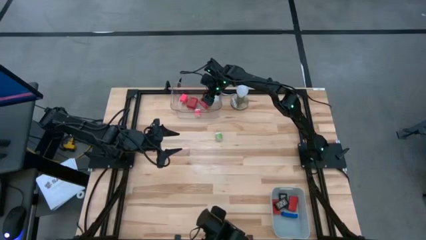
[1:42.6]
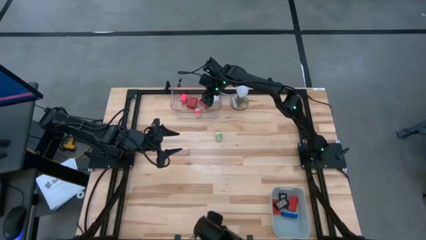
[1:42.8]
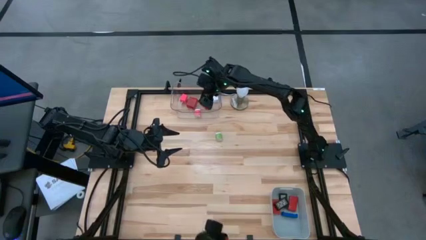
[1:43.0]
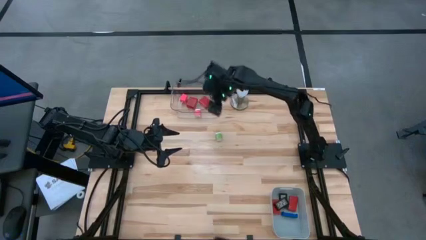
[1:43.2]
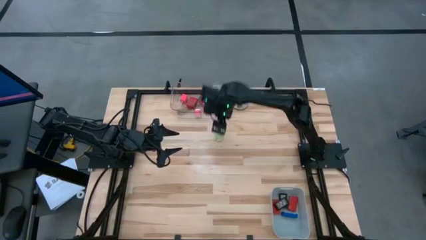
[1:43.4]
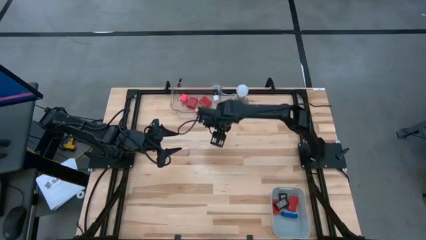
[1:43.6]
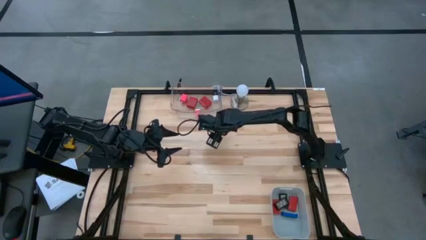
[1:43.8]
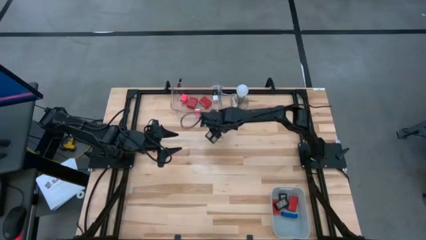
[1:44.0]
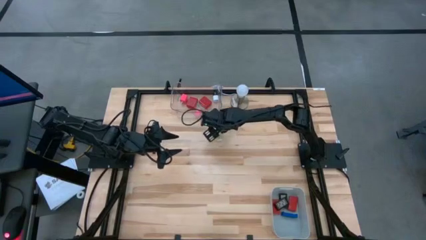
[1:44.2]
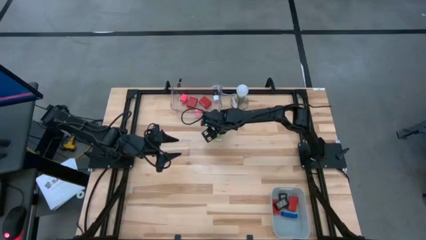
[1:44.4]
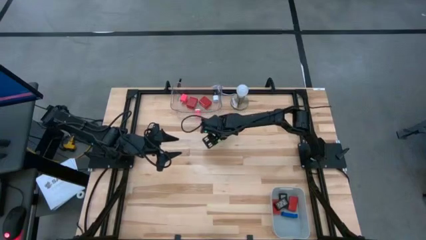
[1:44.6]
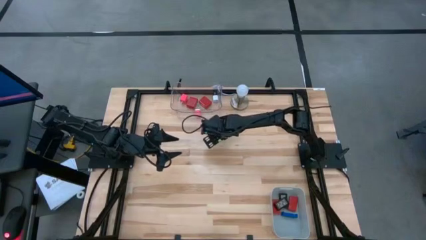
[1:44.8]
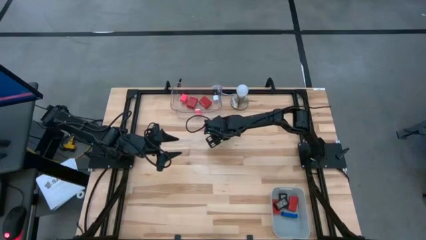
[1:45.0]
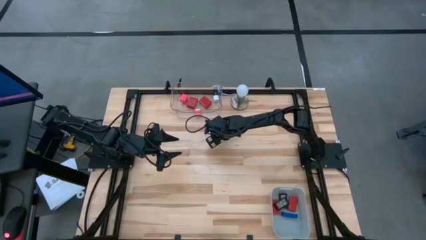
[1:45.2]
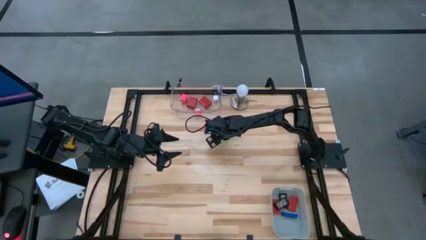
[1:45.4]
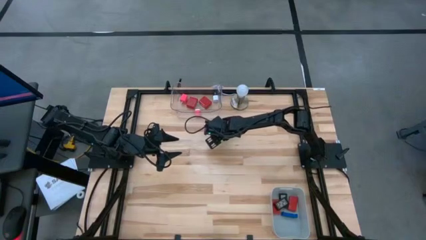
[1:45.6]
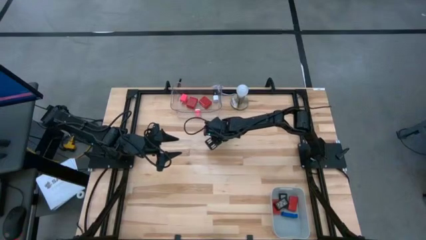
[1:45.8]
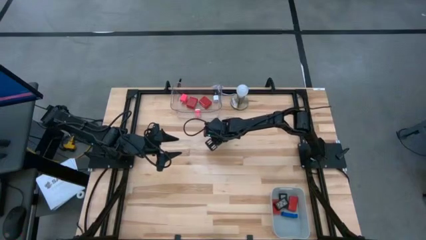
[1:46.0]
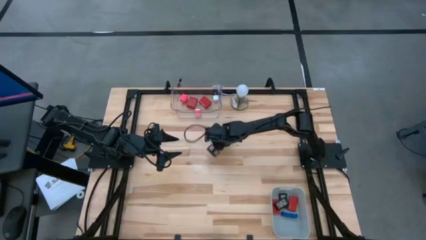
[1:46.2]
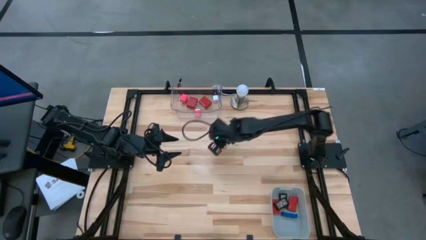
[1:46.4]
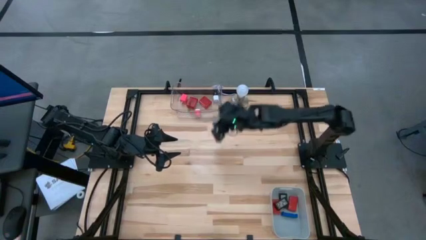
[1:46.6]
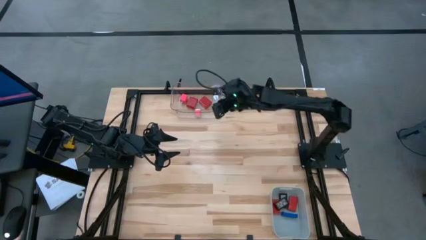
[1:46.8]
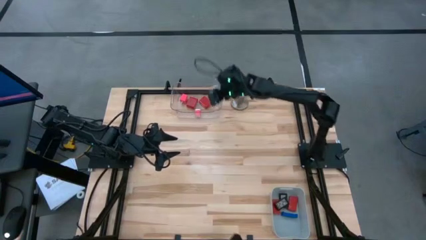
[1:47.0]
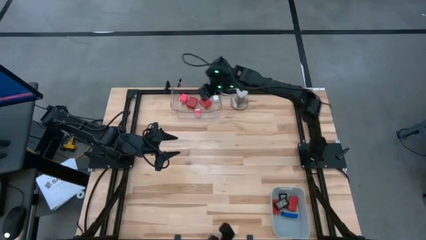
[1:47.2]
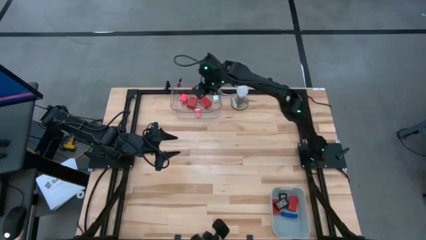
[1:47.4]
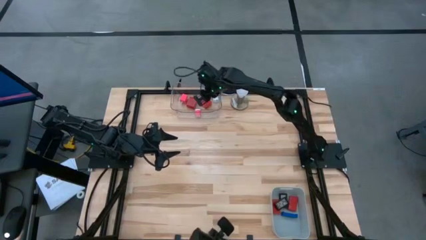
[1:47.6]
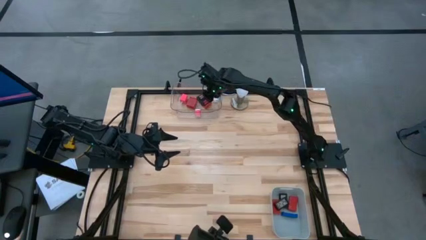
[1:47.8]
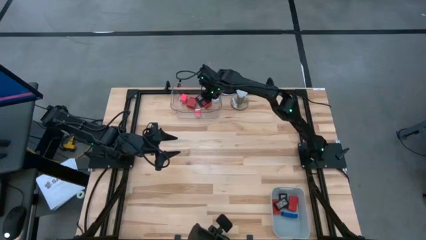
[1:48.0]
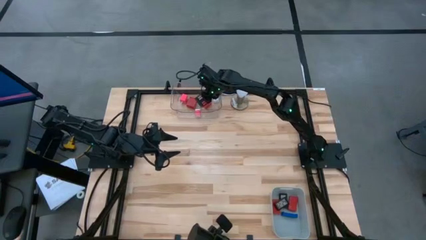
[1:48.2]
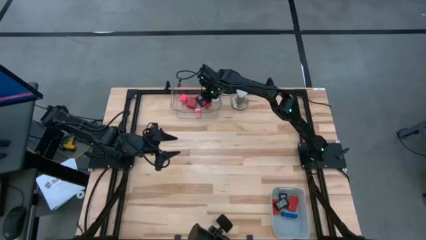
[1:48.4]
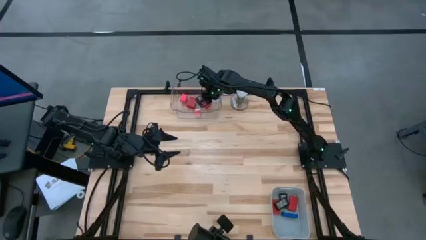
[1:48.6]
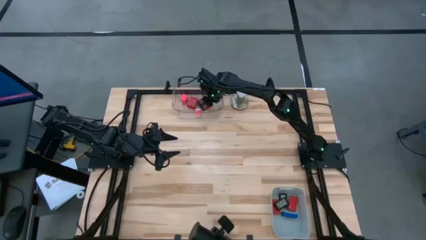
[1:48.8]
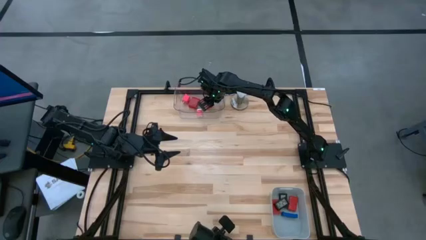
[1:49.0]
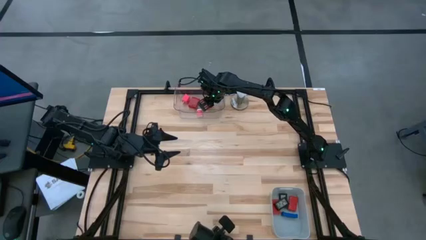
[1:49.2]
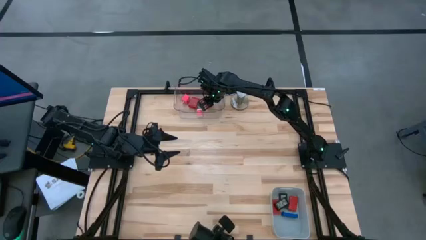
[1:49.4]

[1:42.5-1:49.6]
Task: Pick & Place Office items
Put the green and white charger adapter into the transparent bin

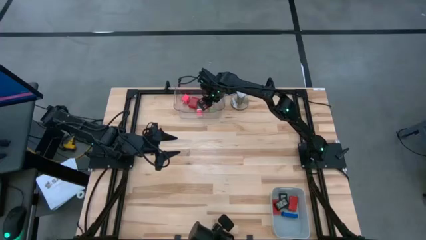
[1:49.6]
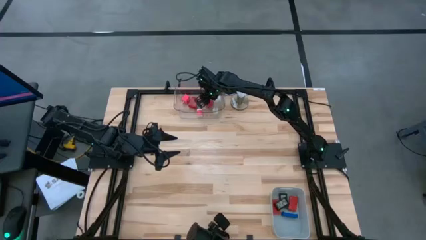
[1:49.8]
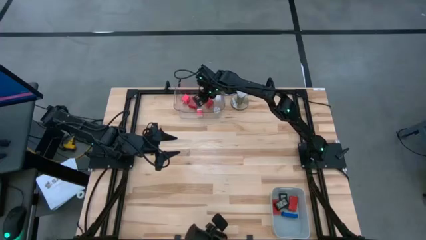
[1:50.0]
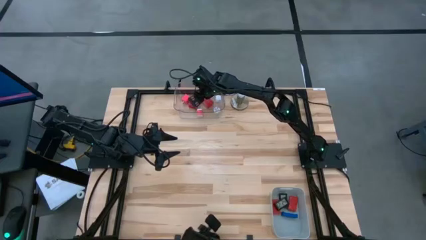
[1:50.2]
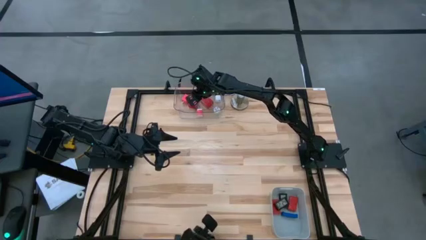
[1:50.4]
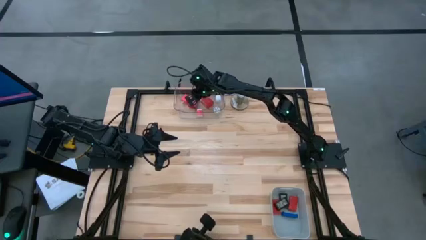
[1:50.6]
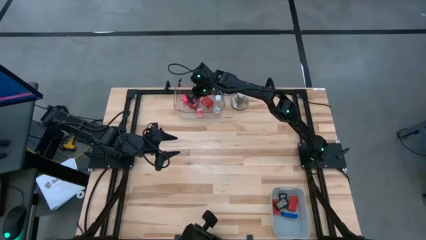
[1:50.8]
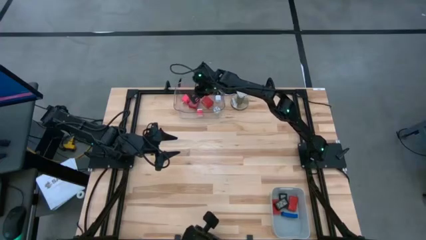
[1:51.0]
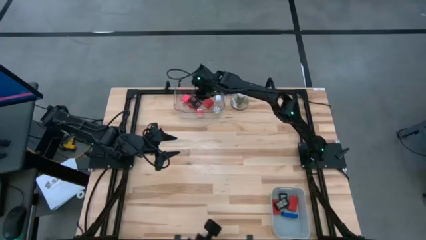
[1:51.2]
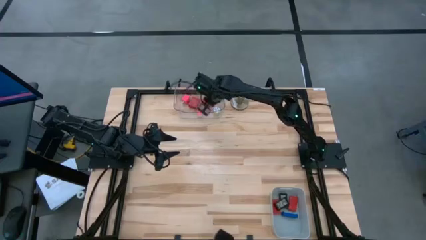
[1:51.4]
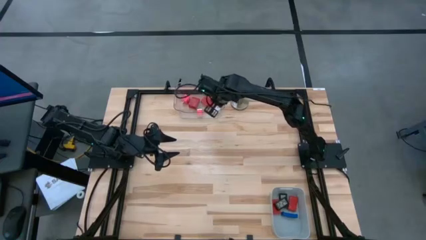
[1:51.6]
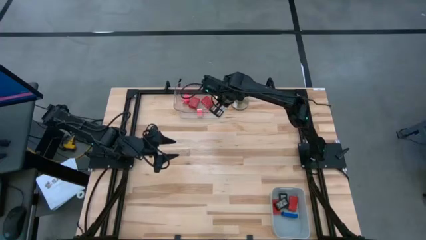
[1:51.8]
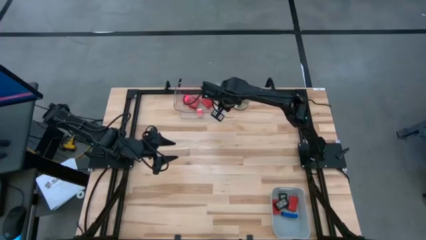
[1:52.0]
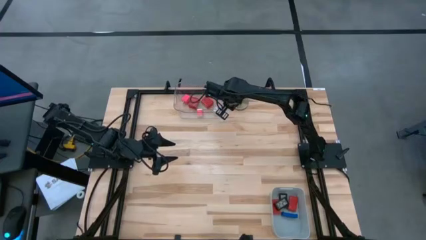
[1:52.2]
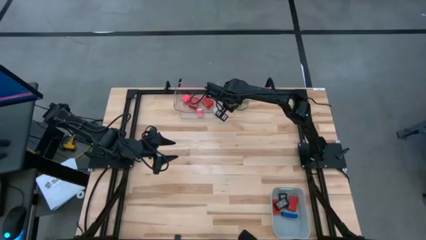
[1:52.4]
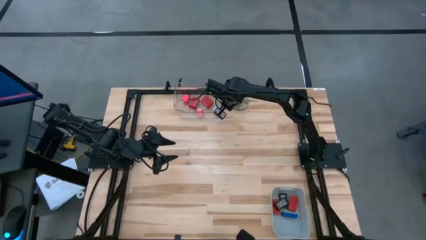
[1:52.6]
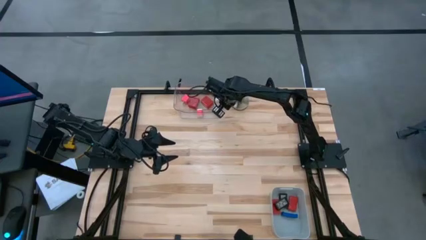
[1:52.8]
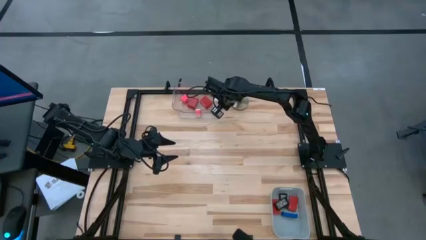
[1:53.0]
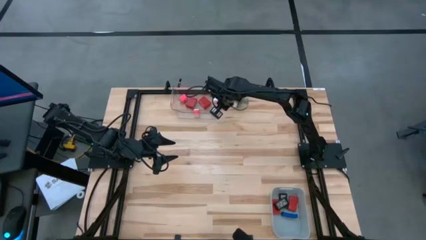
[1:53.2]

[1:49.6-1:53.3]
Adjust the transparent bin

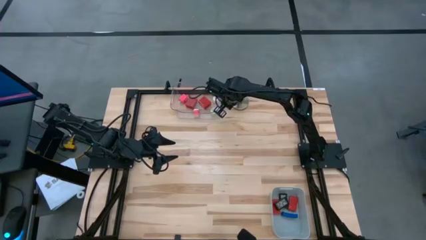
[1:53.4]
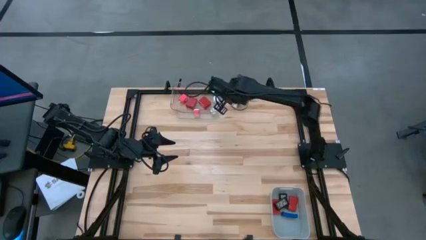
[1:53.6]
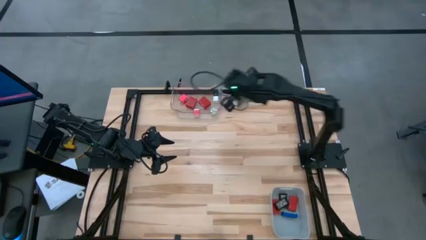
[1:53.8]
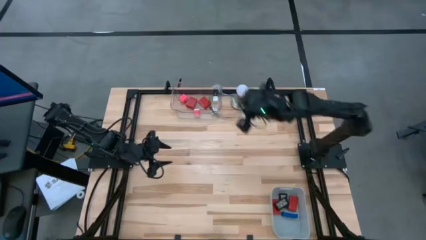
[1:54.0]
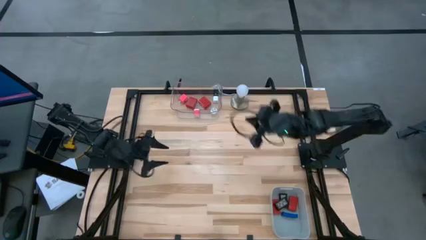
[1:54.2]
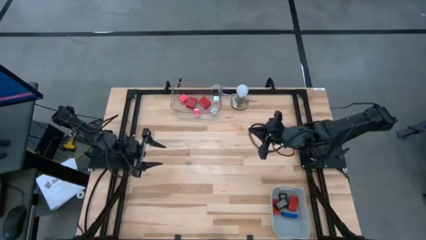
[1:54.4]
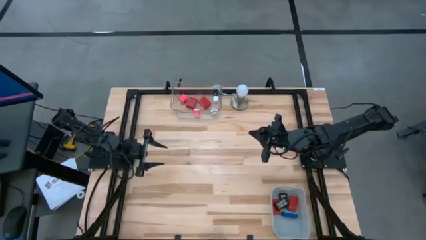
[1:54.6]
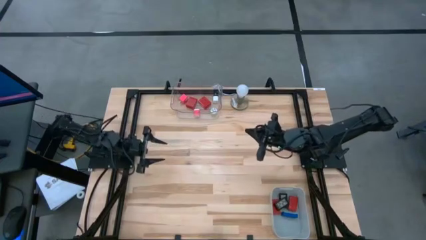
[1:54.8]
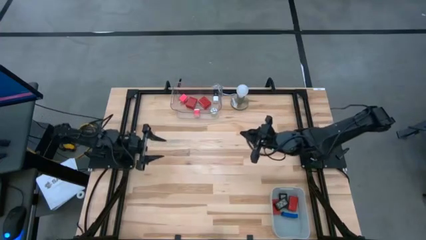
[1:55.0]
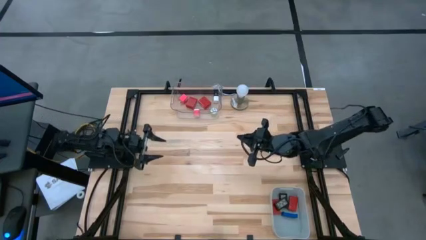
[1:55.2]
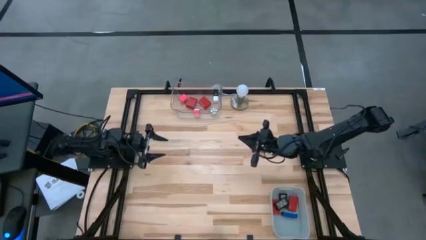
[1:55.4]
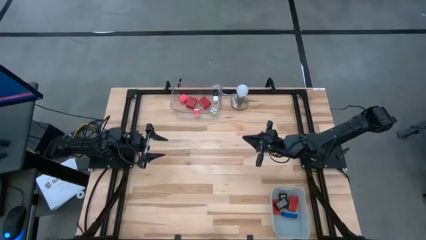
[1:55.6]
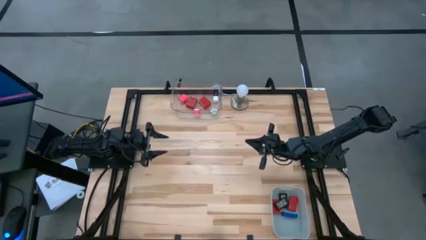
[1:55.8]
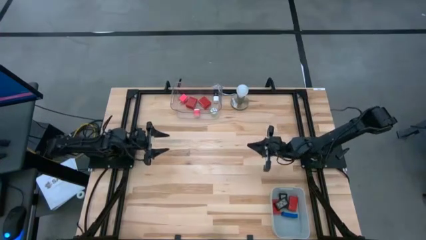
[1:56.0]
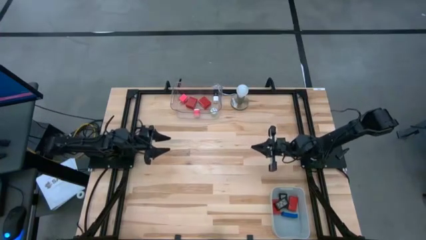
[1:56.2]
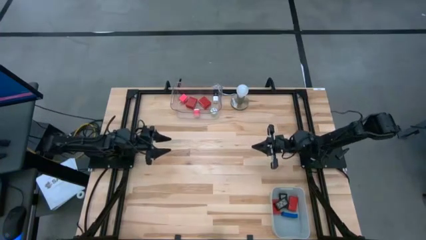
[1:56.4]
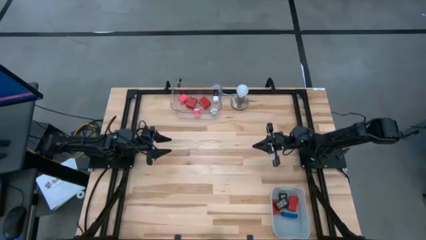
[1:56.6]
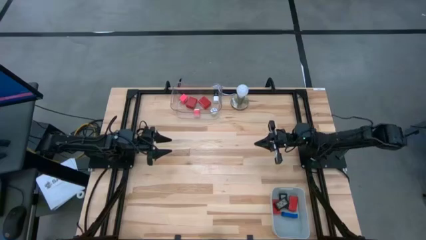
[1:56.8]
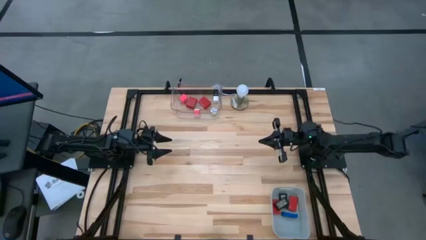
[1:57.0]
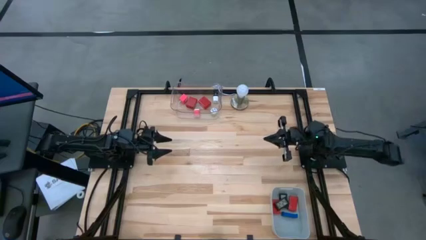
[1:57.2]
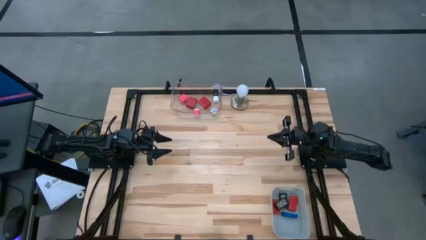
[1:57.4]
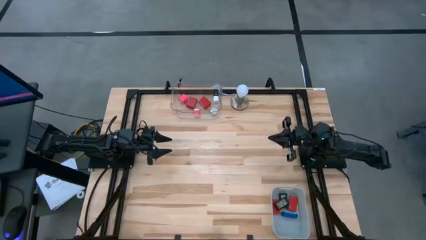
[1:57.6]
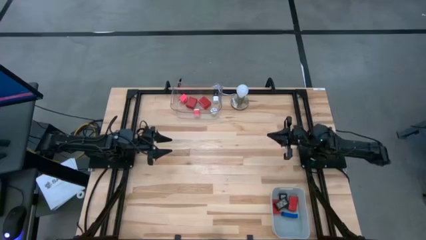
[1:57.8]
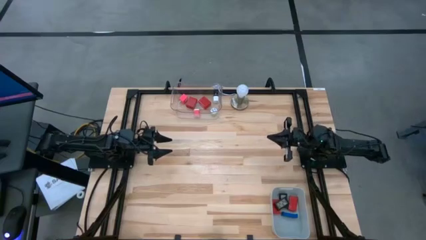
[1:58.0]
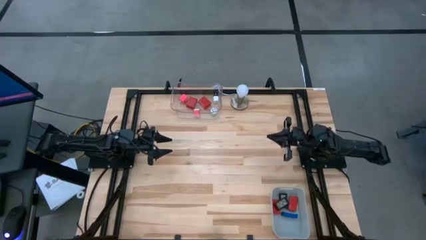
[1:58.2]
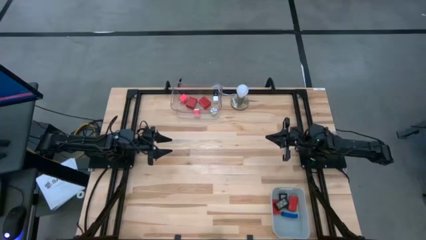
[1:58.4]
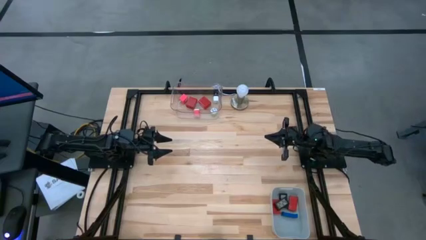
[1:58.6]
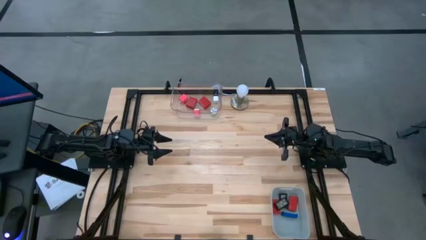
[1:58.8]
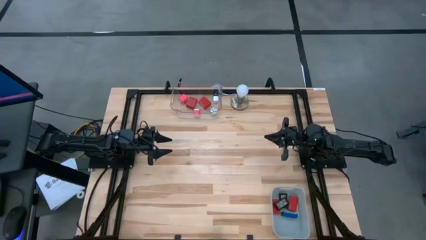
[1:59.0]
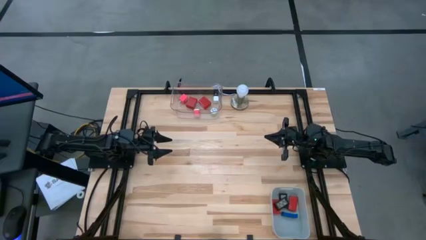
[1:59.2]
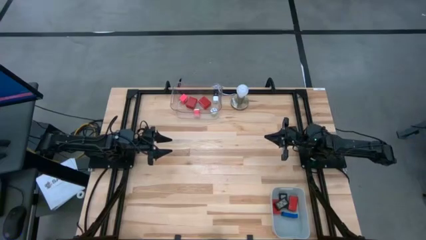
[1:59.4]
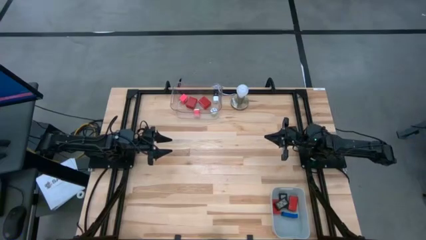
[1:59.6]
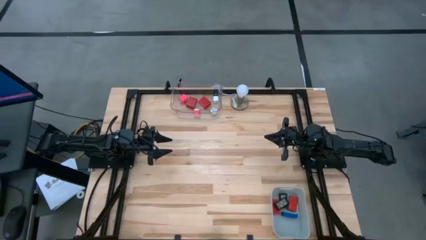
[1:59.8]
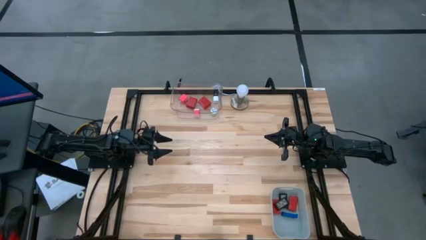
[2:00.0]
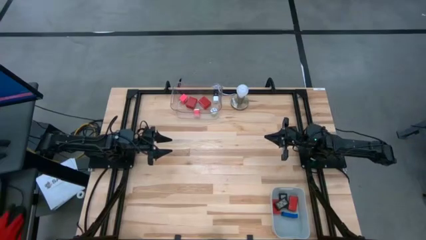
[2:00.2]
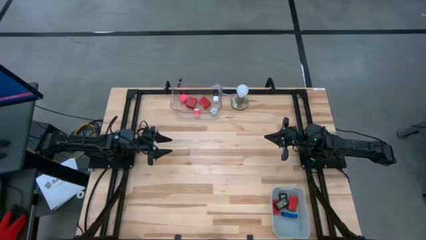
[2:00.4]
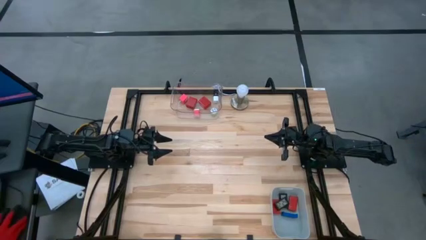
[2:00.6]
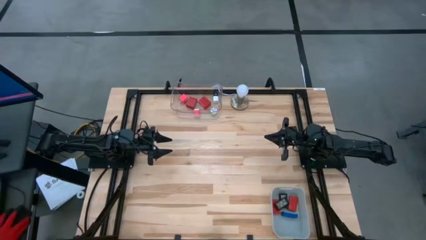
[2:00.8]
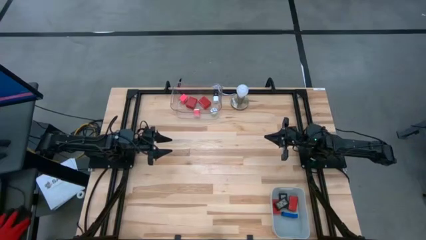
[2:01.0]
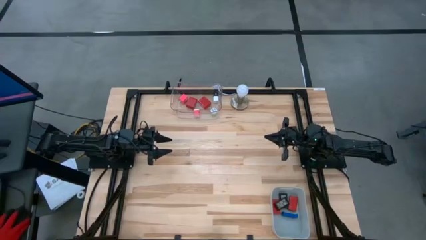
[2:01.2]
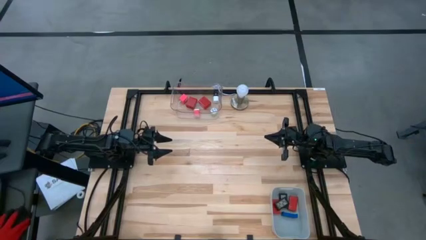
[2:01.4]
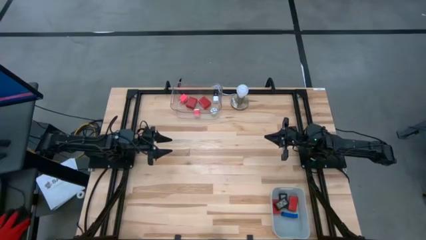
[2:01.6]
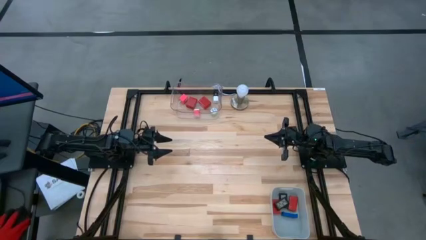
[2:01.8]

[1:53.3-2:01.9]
Return to Home Position
